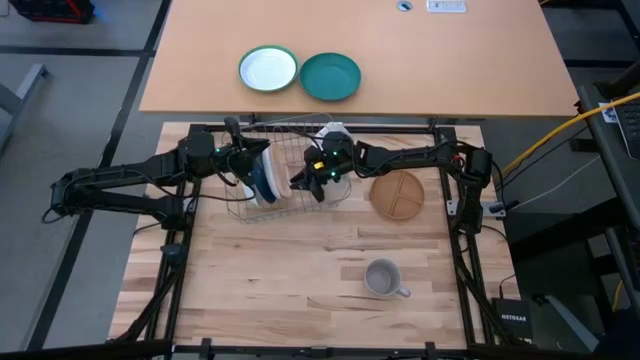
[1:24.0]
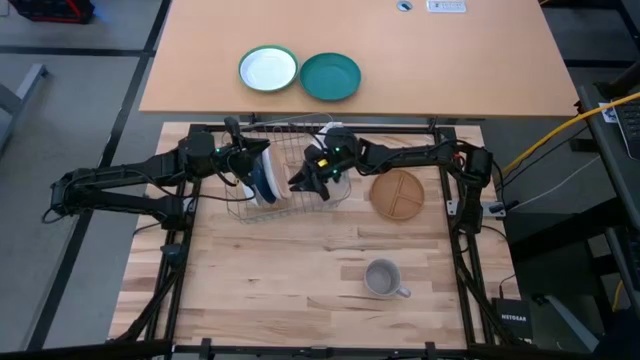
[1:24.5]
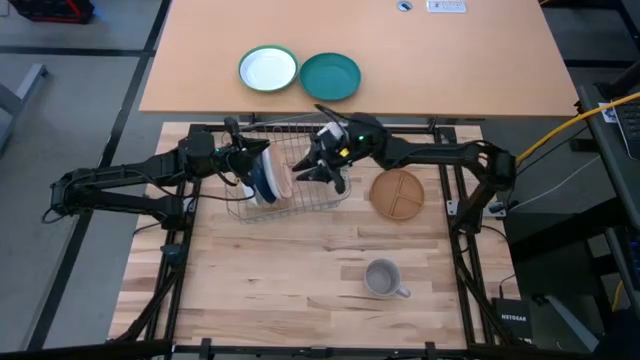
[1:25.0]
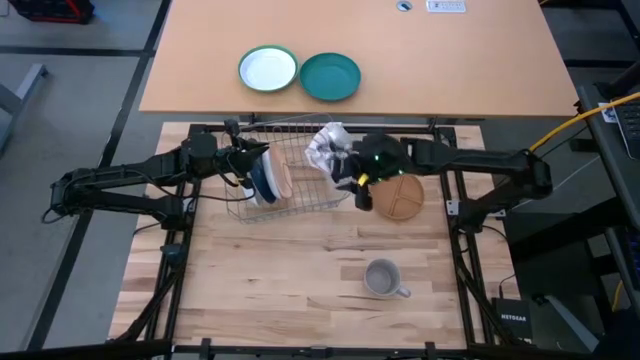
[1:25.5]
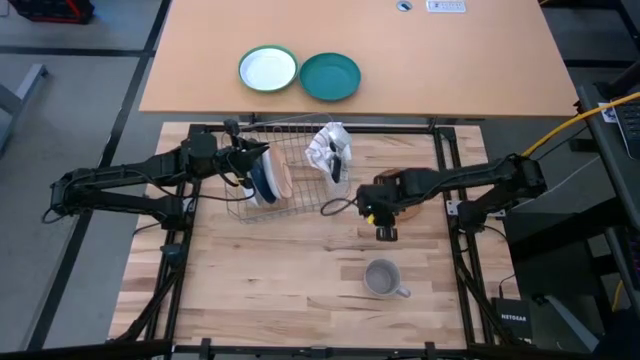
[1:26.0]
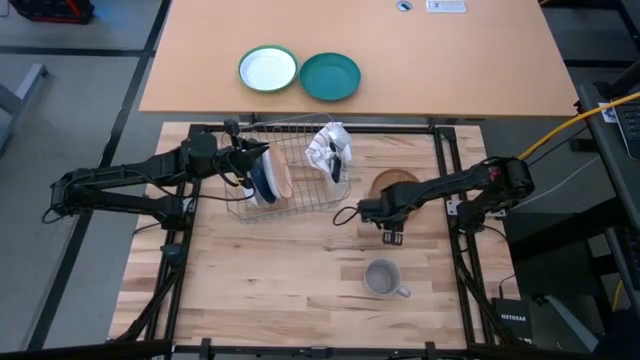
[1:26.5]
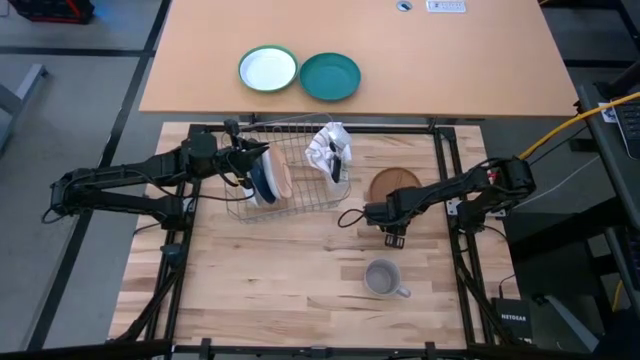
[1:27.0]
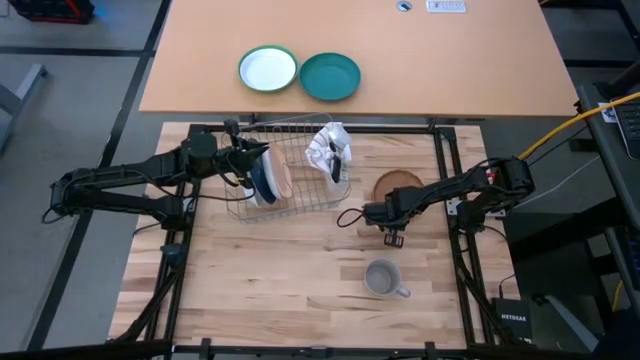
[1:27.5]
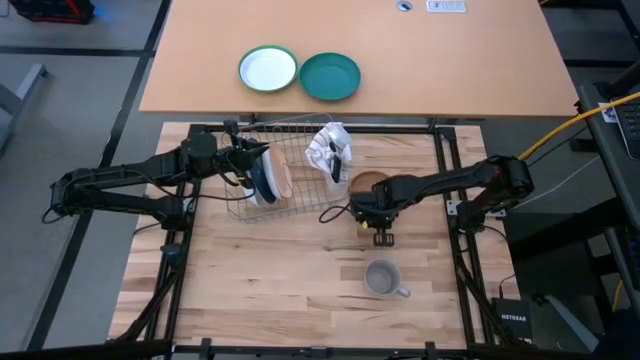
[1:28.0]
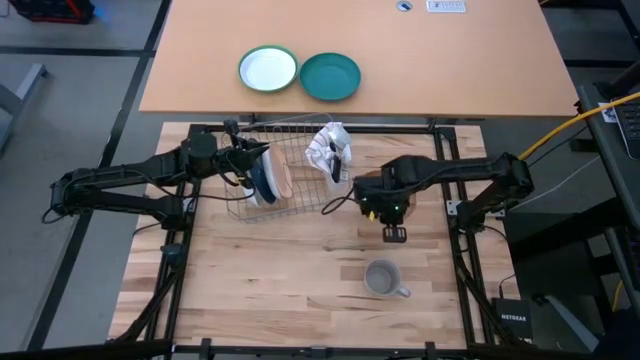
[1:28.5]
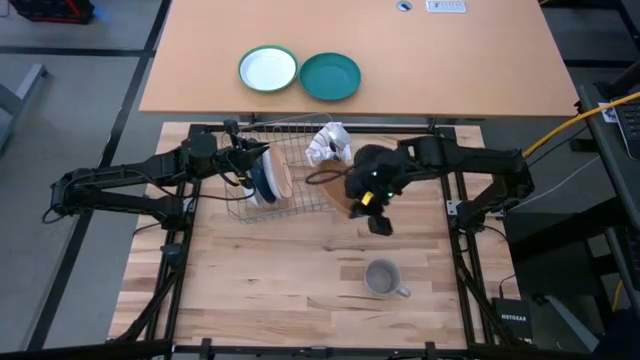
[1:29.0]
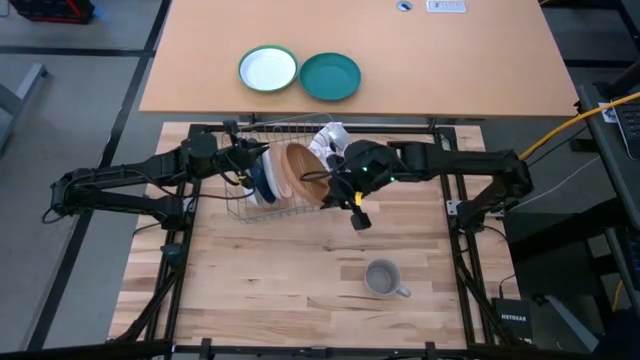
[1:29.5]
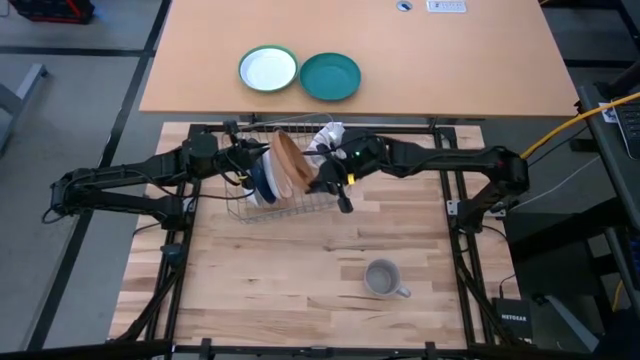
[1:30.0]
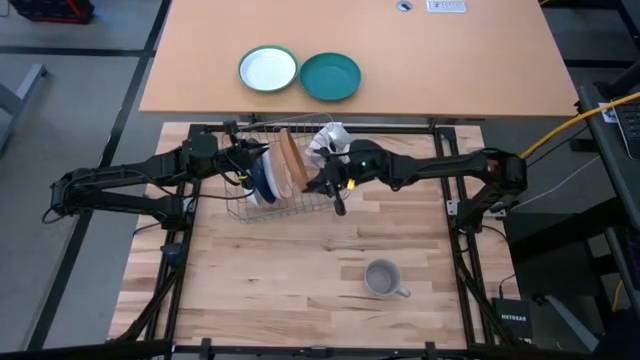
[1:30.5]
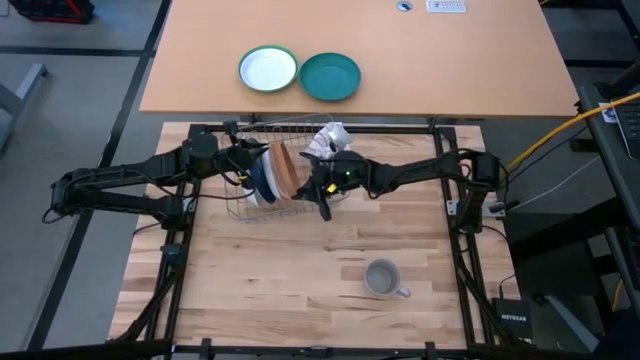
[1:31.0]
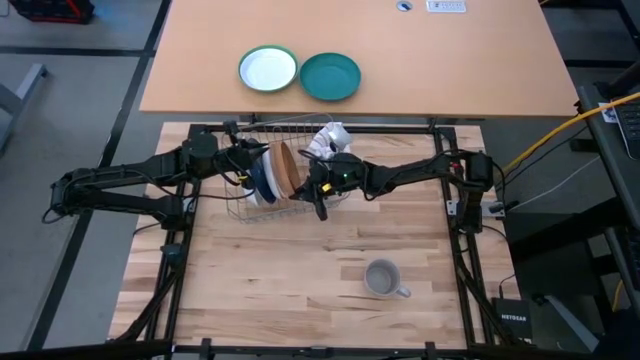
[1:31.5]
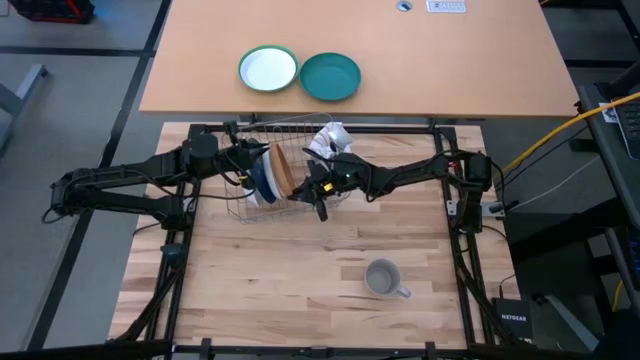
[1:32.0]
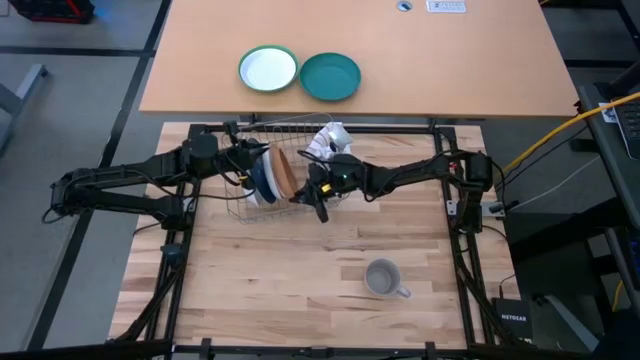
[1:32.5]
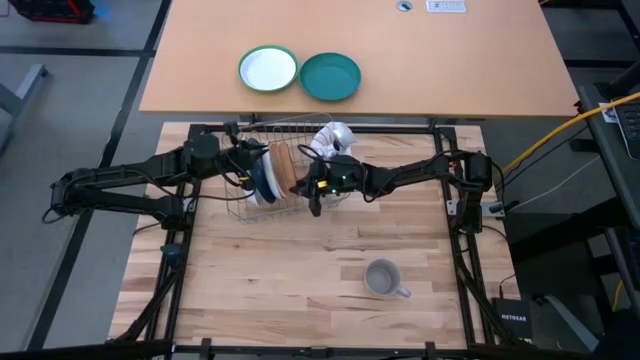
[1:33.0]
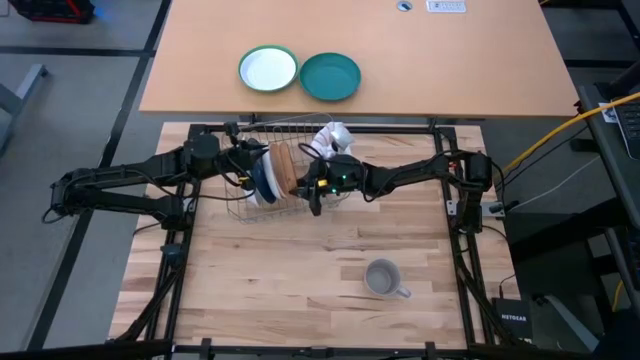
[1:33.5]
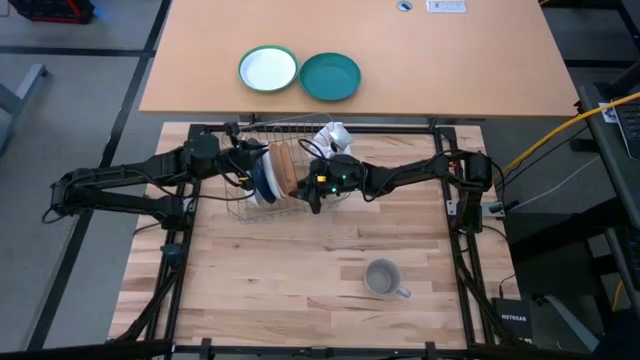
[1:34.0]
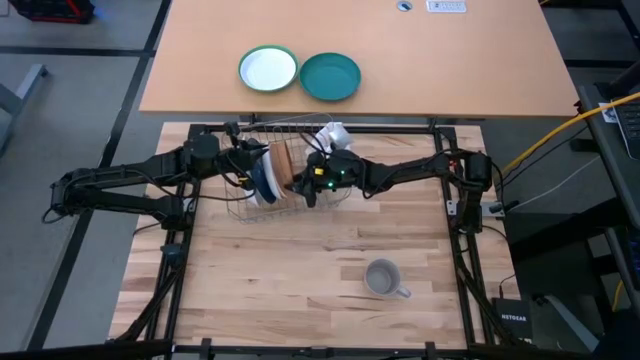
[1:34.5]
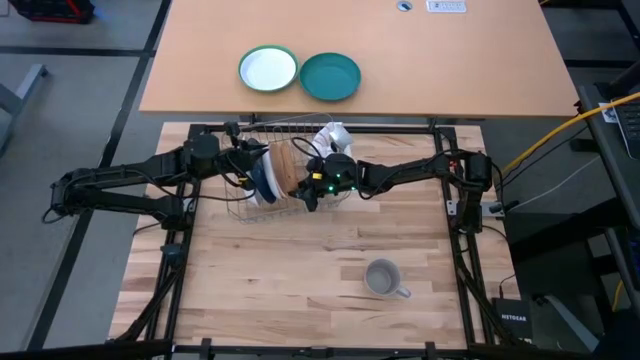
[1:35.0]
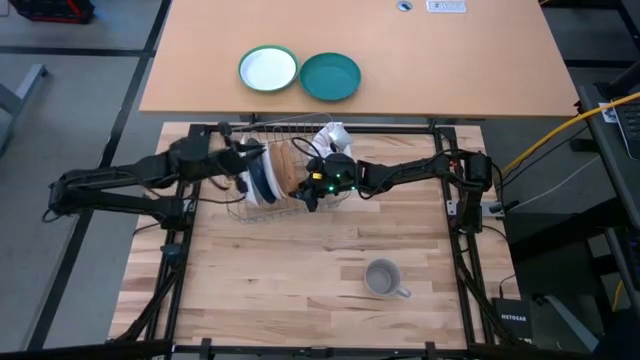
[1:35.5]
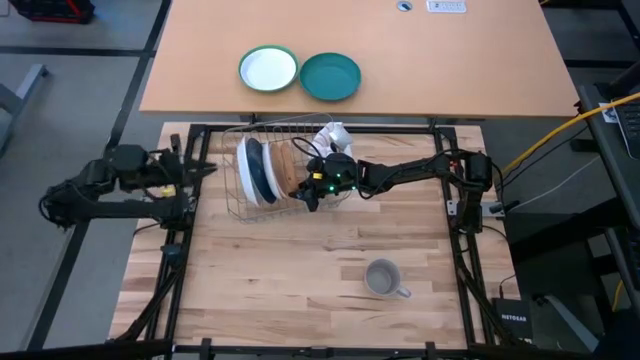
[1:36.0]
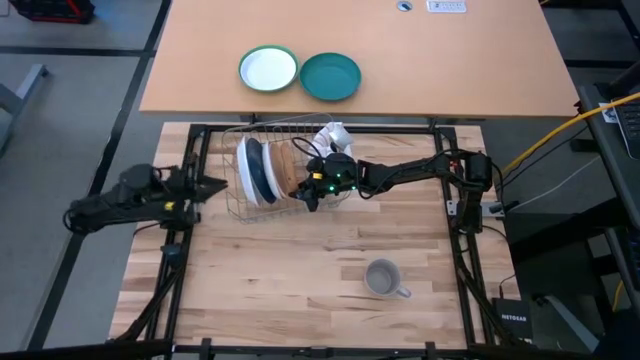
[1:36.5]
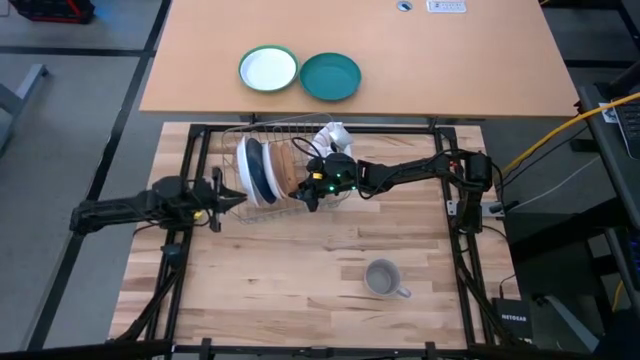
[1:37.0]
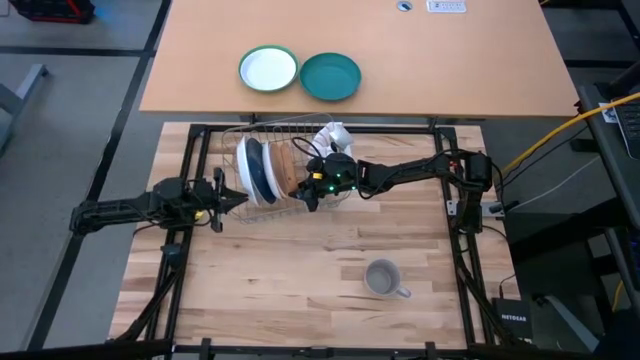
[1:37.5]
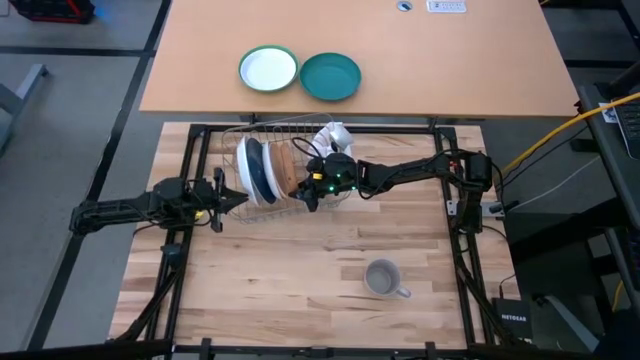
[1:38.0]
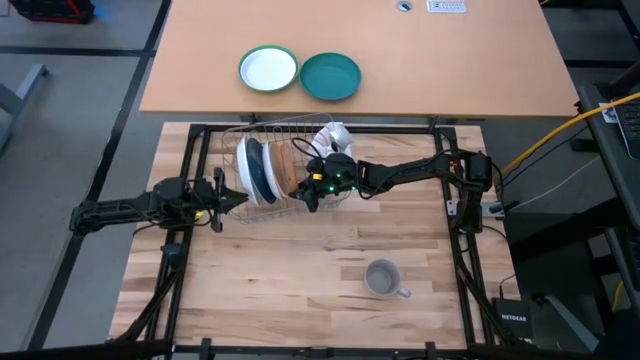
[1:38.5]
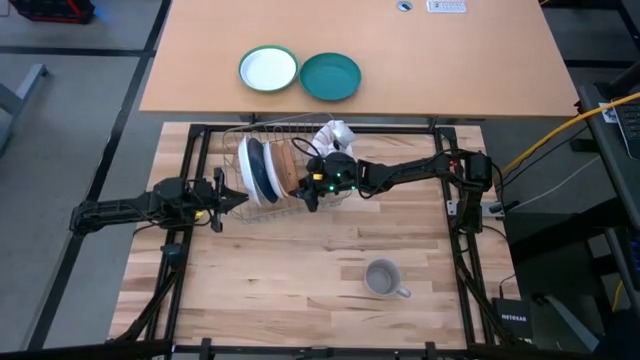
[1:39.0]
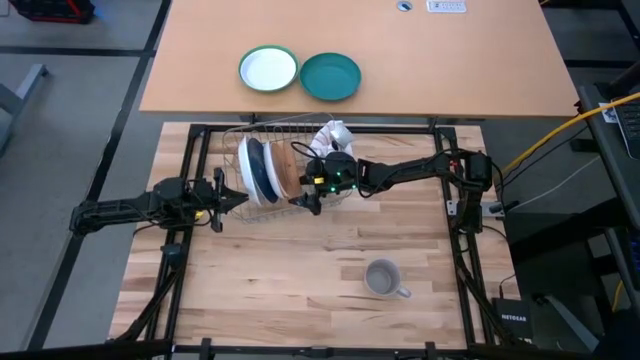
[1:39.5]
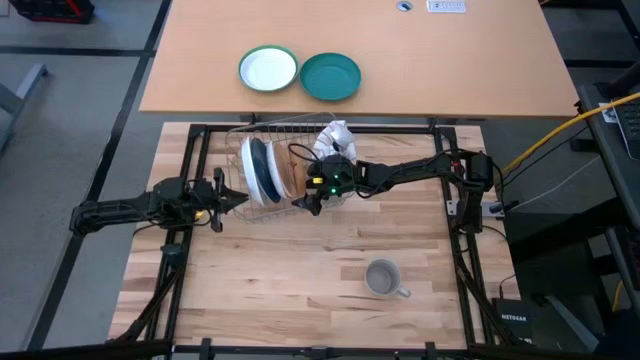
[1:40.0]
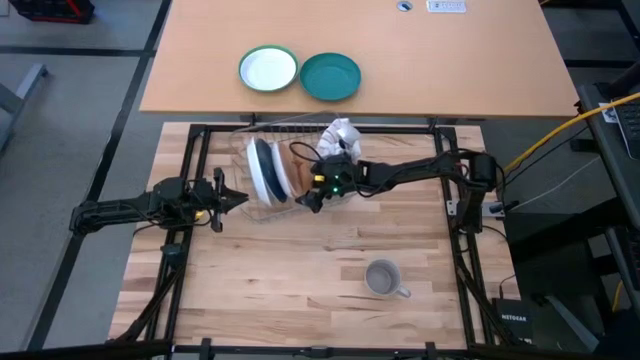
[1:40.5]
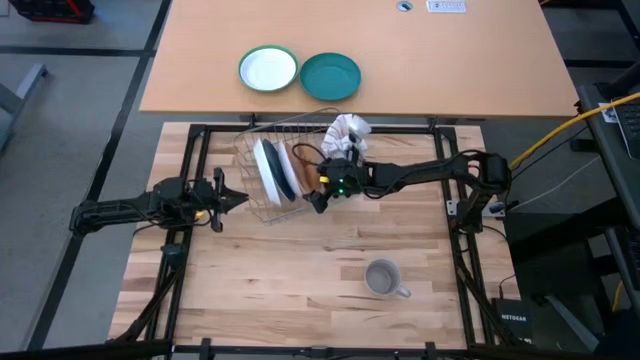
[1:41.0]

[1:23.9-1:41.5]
Task: Sort dishes
Put the brown plate in the dish rack

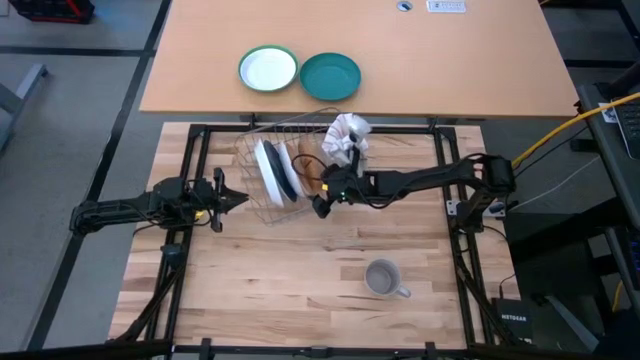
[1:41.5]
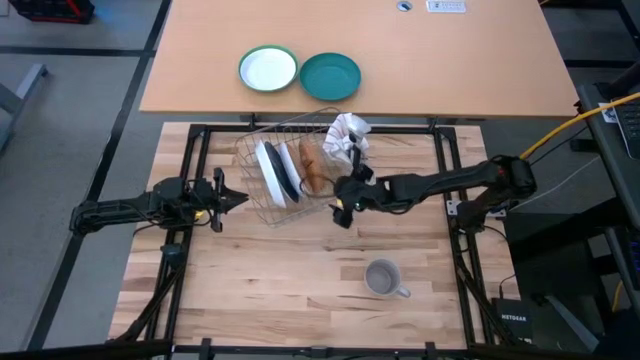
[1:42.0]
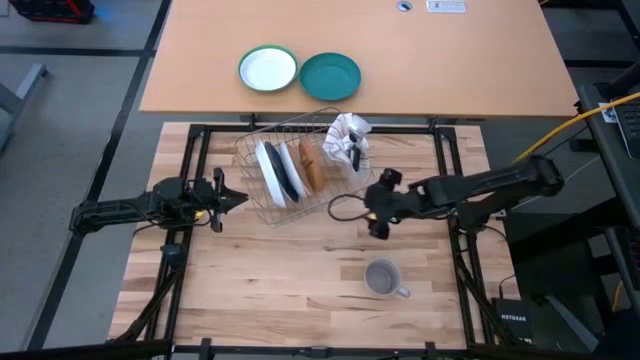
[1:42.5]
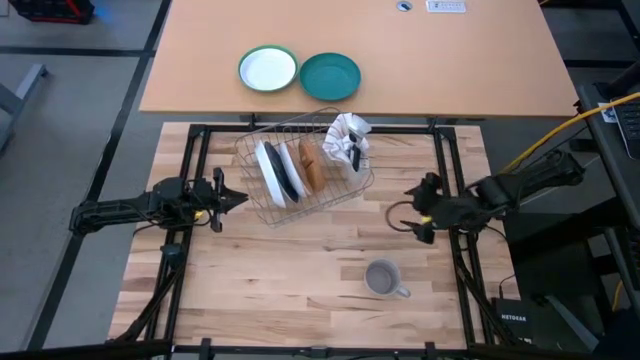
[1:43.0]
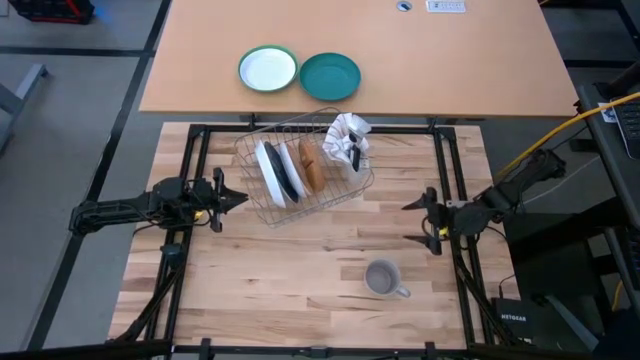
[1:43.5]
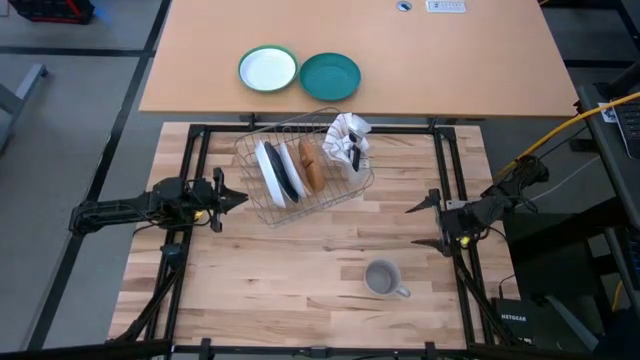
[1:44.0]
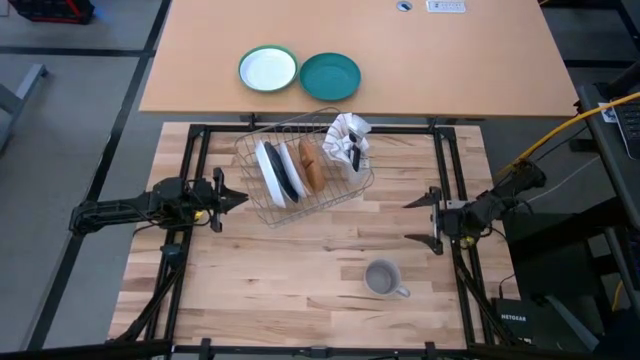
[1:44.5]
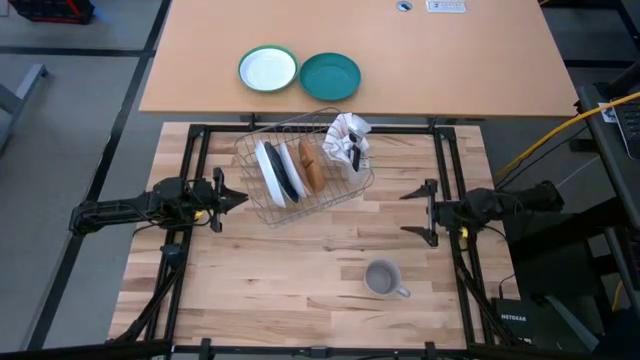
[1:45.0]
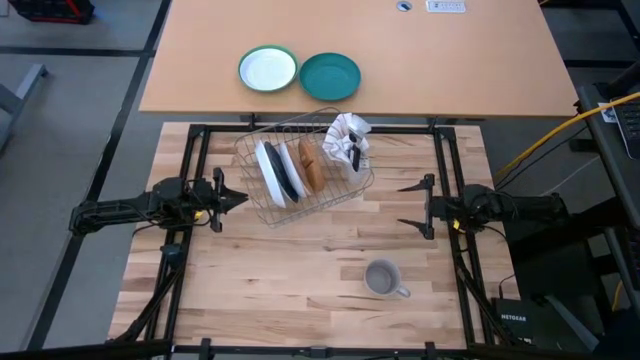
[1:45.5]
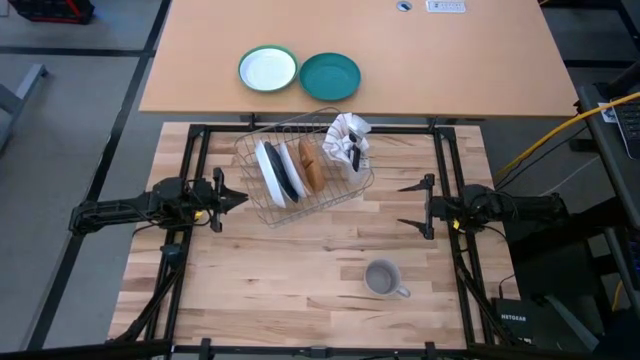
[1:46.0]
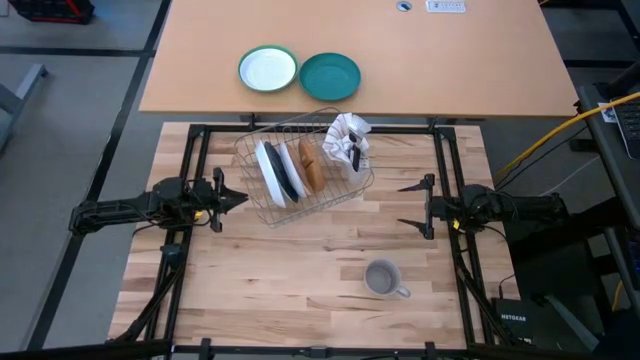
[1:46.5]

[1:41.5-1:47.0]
Return to Home Position
